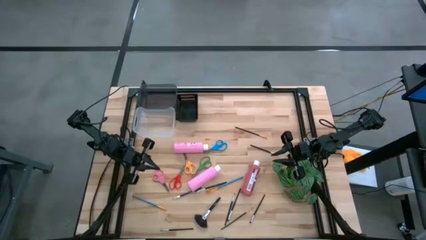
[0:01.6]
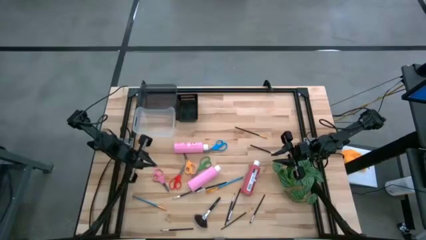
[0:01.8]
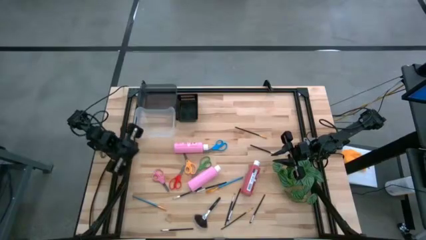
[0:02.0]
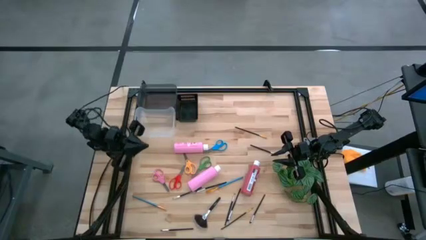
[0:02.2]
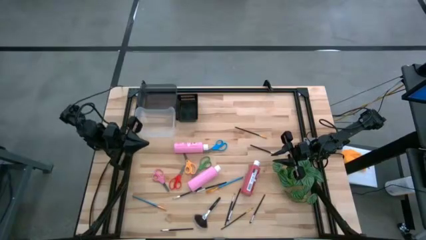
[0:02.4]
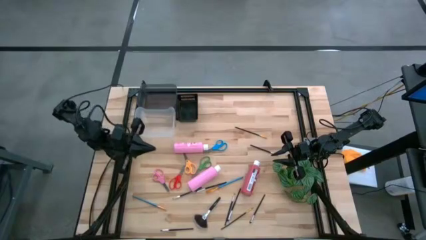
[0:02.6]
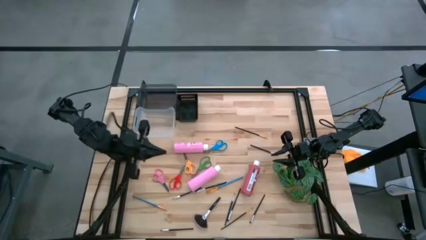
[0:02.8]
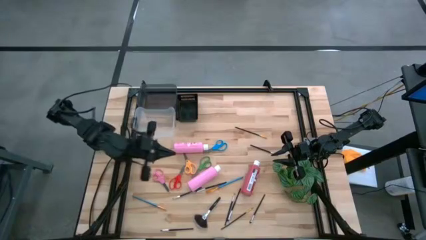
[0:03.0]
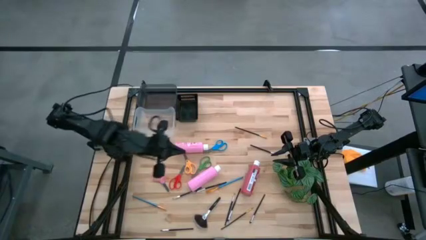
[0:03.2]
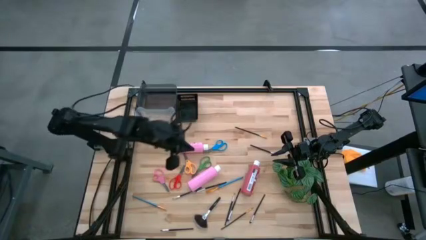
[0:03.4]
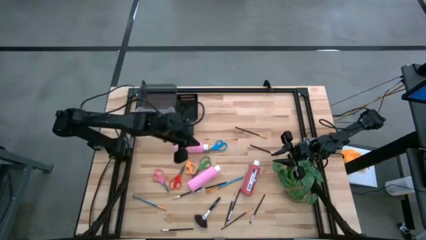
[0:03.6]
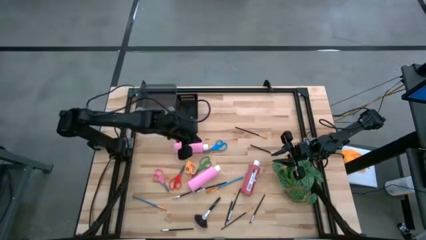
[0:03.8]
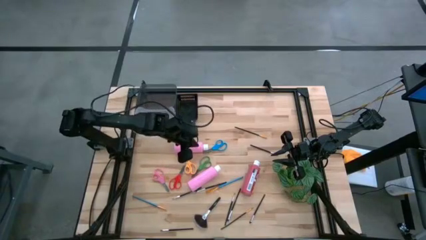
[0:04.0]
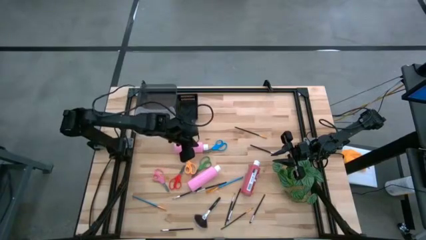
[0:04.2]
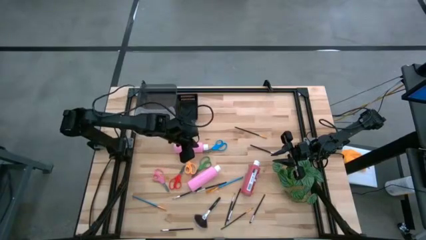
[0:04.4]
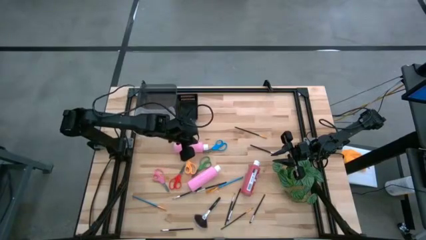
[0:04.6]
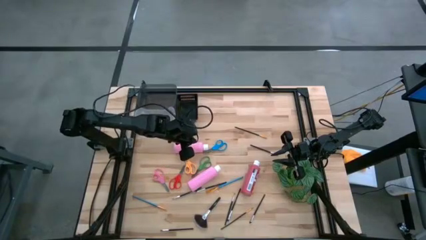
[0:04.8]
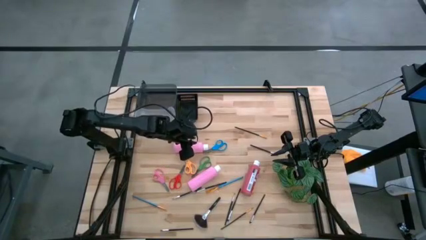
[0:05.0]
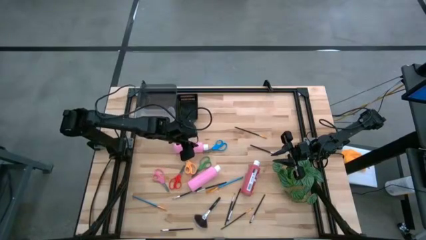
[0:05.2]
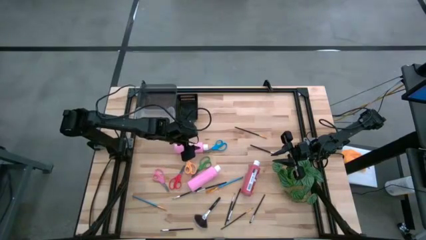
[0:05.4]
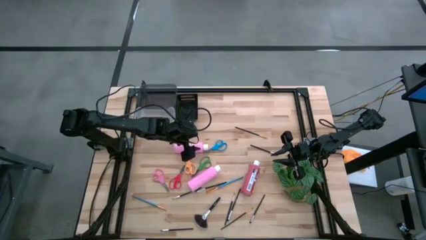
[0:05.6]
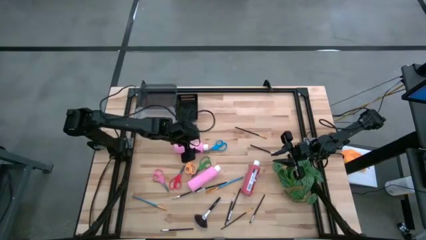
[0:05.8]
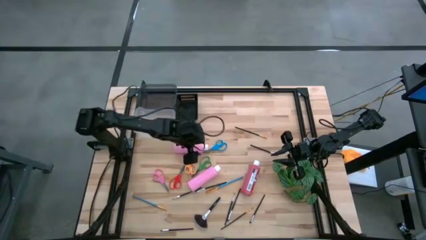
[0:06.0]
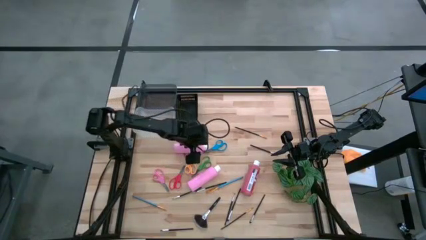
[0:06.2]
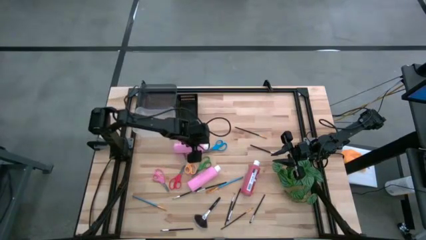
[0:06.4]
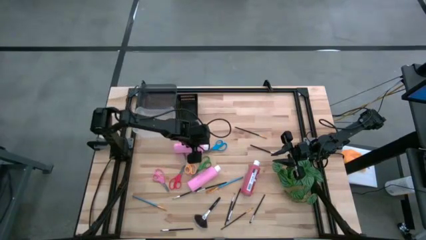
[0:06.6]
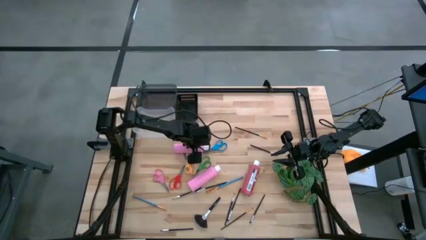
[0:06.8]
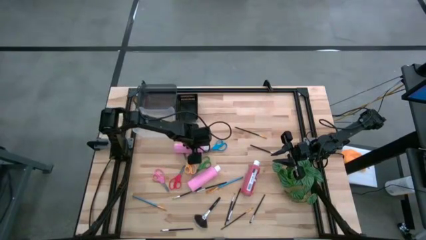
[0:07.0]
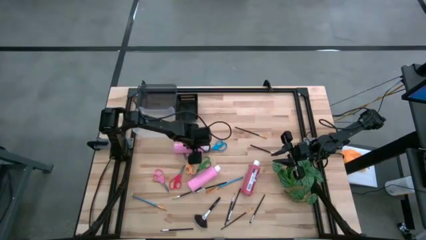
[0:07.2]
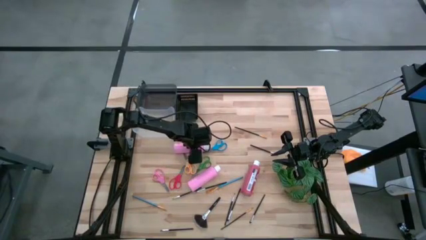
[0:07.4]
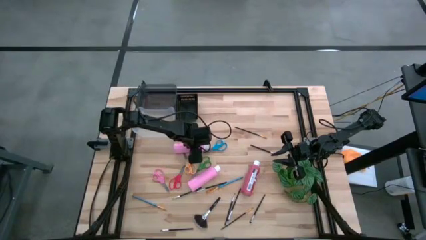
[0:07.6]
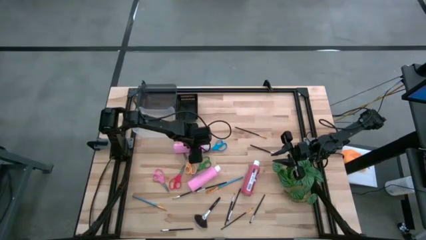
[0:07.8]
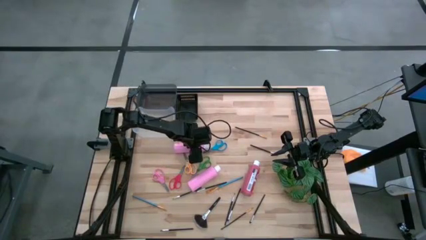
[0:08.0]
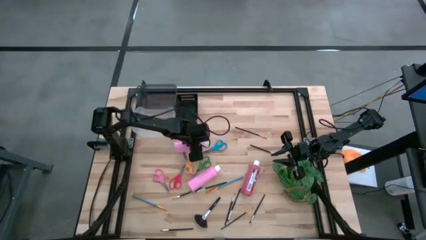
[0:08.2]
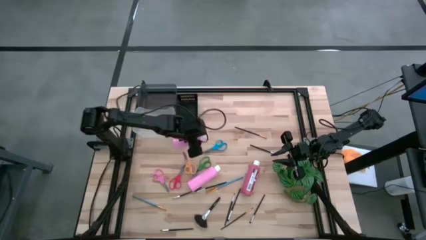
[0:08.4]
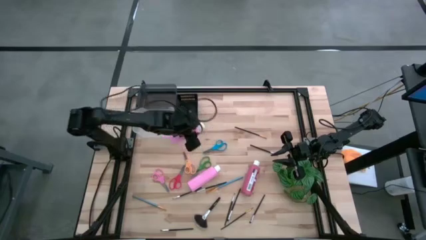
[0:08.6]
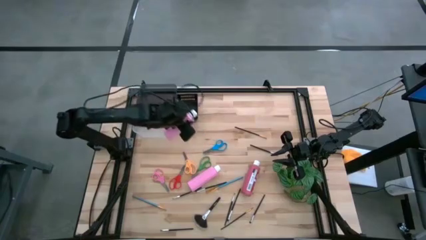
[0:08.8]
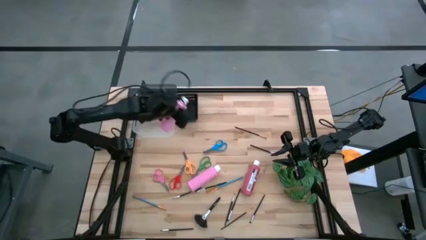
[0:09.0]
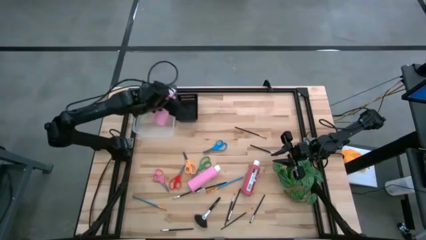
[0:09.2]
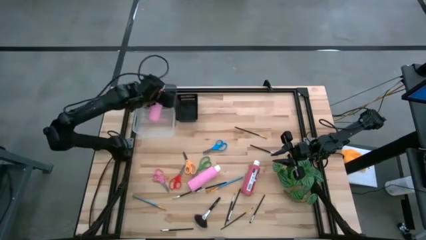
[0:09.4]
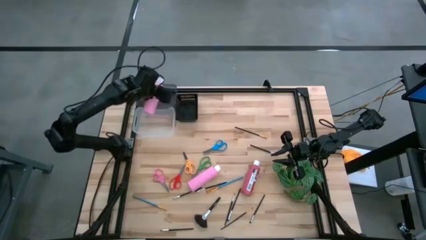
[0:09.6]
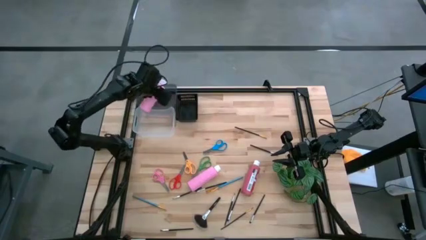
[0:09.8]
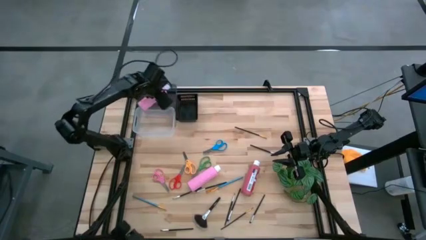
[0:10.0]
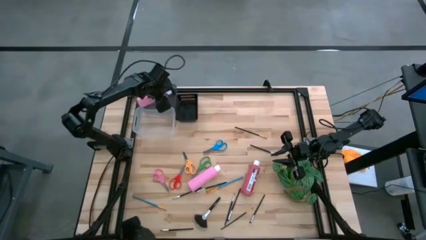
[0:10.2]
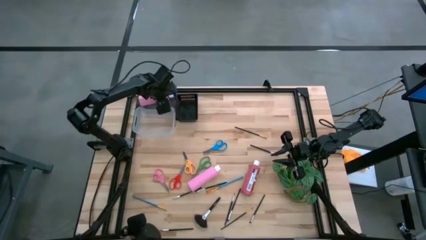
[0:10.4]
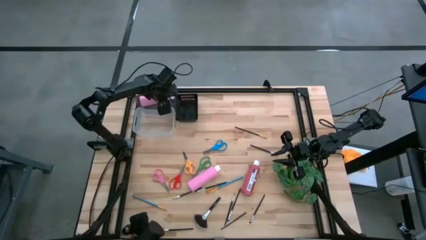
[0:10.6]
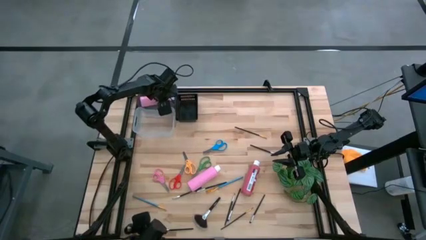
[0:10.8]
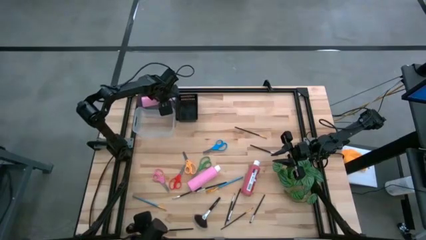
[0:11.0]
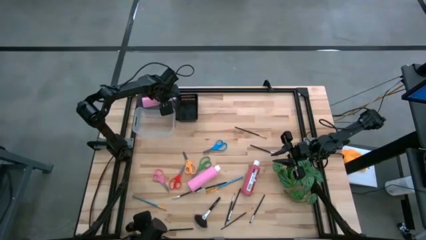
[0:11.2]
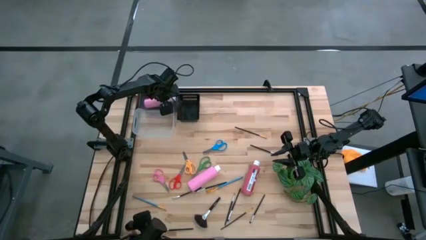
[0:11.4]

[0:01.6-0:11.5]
Task: Pick & Place Paint Supplies
Put the pink bottle into the left black bin

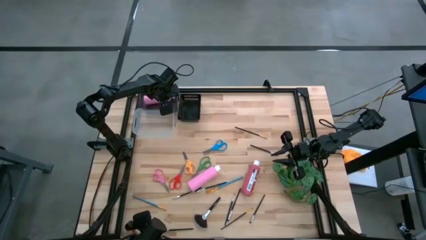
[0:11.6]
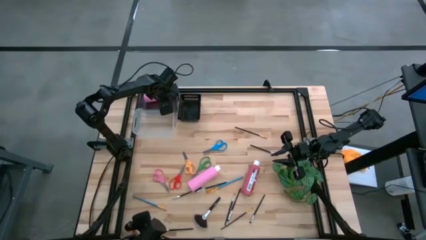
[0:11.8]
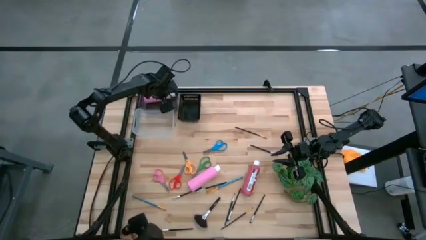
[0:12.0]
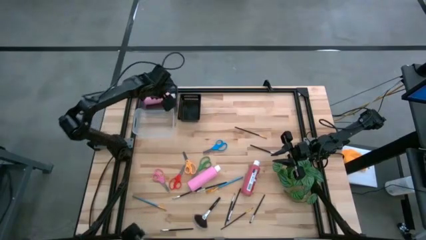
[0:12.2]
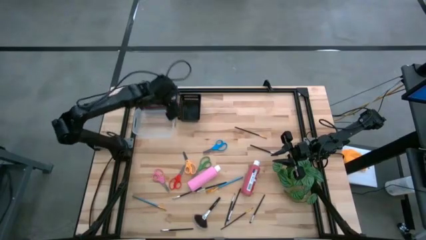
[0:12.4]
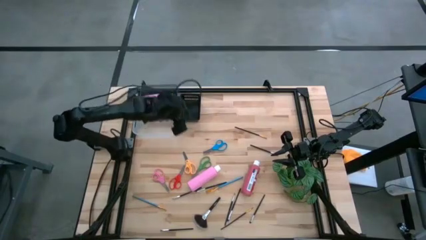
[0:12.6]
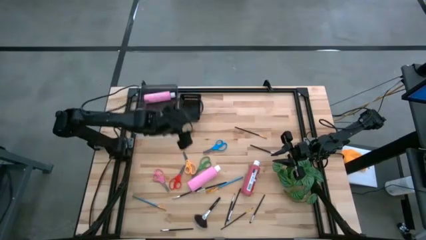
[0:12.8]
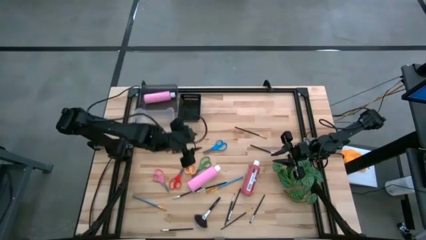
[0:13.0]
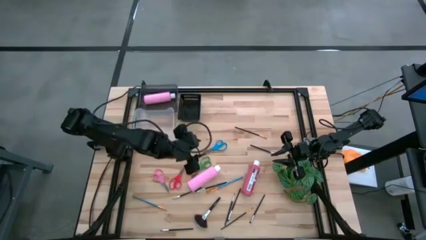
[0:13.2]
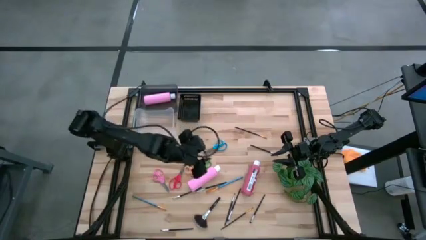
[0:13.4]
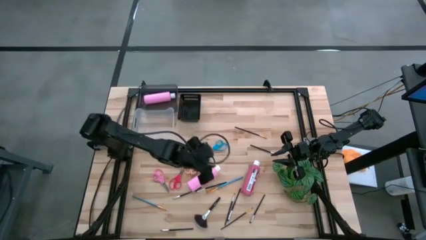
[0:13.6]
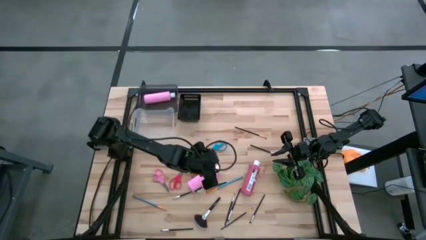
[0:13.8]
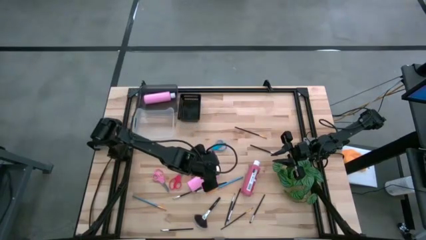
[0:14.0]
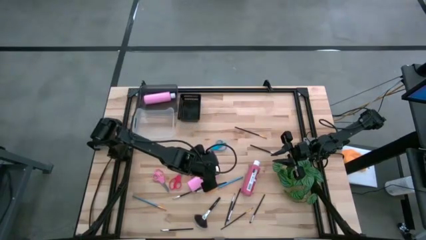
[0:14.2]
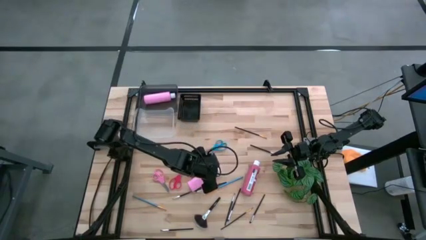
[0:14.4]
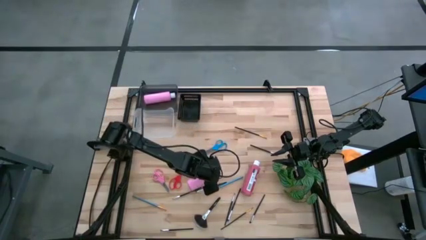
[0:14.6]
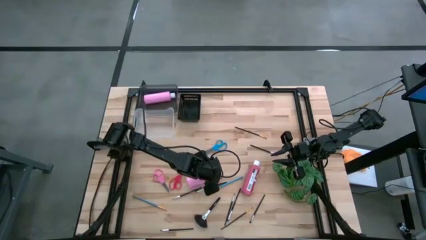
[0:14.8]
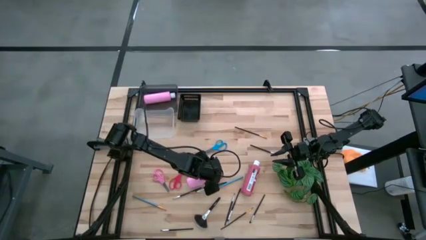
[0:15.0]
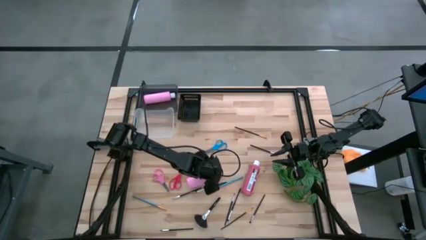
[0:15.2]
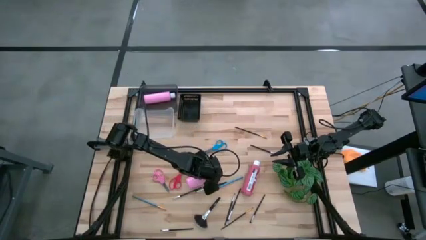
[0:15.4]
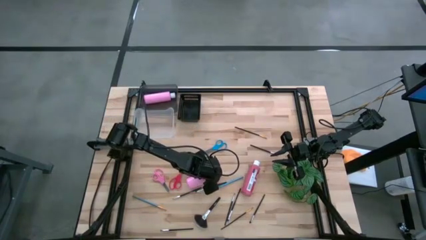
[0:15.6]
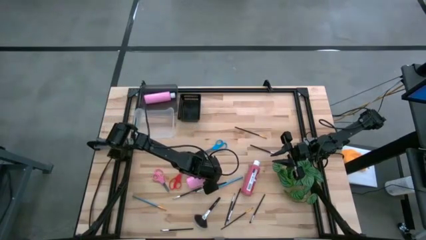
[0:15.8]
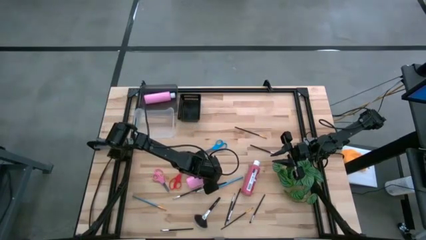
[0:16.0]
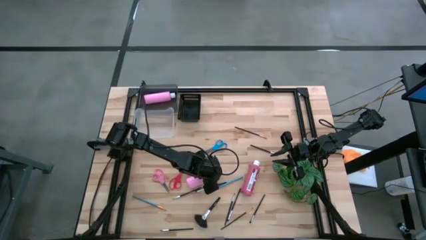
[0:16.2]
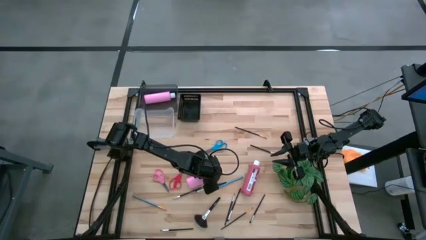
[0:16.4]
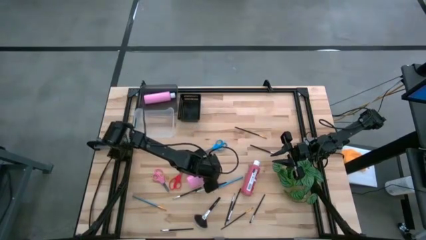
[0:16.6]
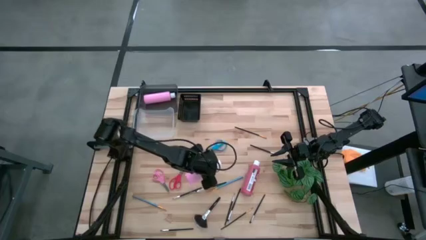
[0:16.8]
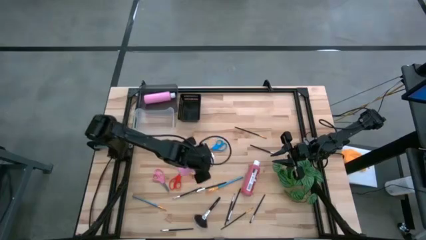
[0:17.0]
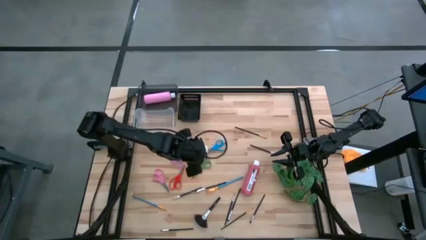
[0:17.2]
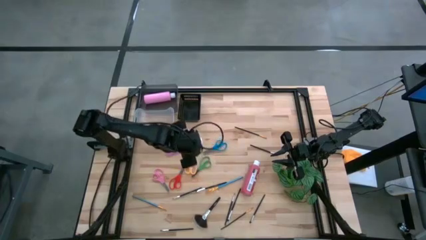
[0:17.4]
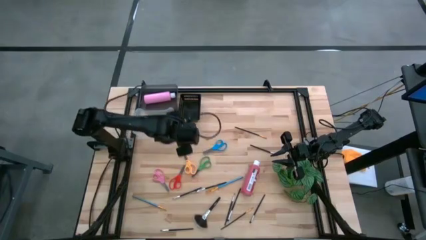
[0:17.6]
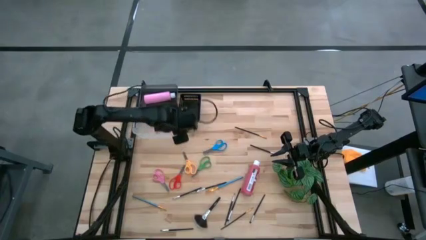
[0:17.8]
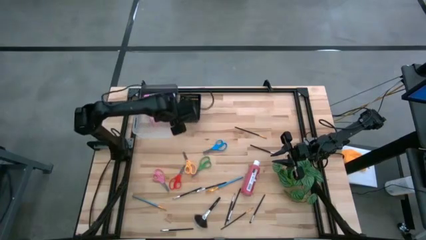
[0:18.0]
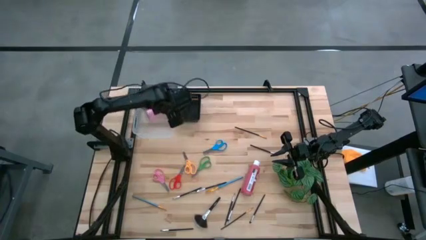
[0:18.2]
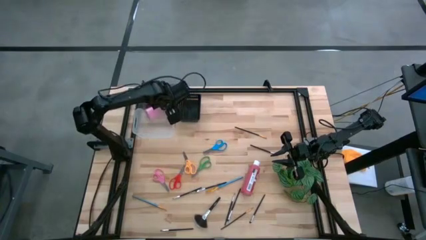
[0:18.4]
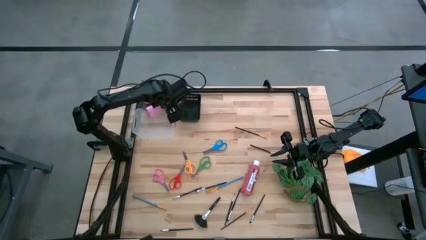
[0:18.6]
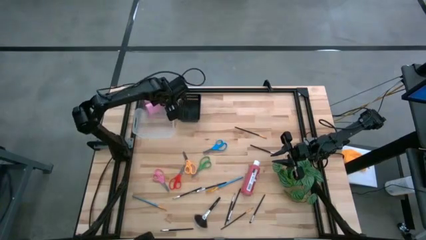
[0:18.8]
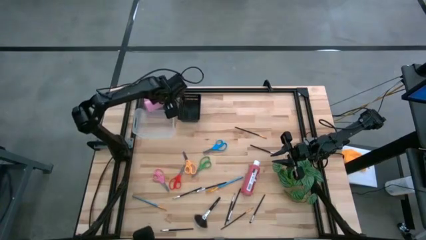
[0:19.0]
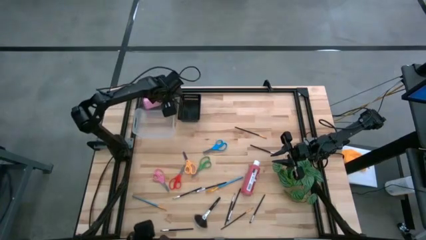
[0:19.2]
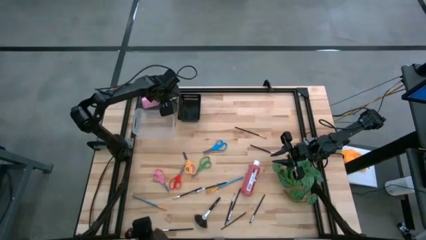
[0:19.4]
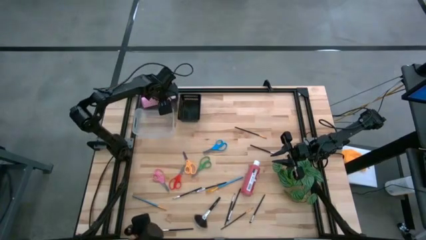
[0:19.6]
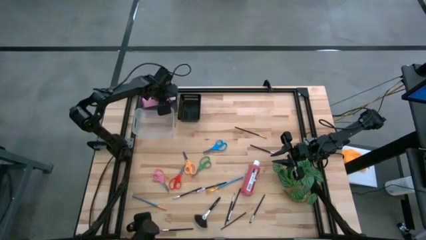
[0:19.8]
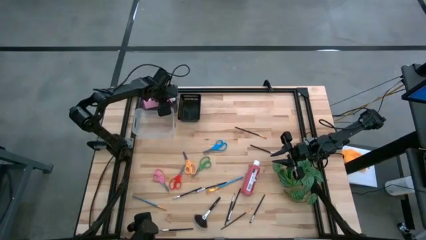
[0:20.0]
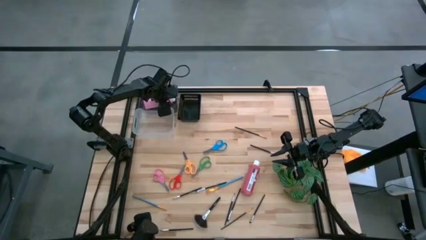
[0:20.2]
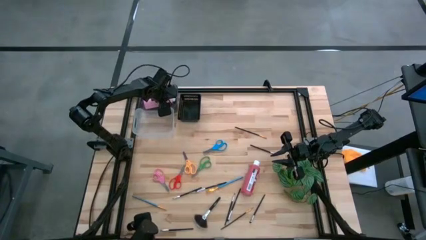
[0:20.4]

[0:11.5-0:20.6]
Put the pink bottle into the left black bin
